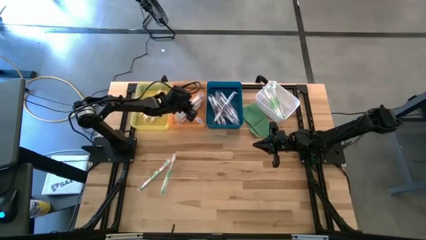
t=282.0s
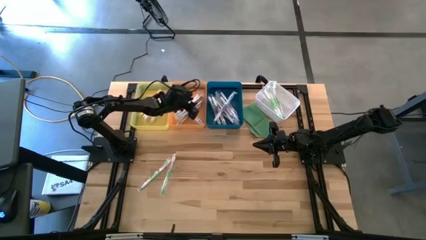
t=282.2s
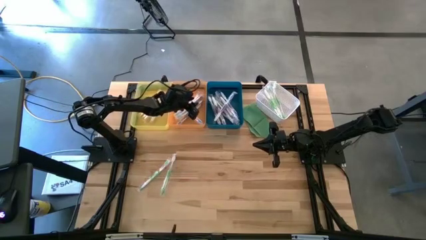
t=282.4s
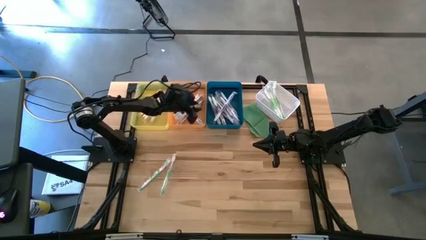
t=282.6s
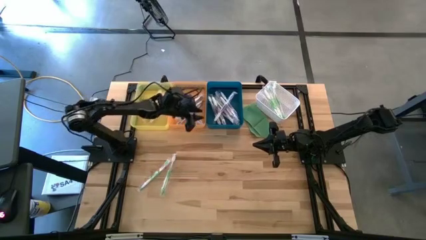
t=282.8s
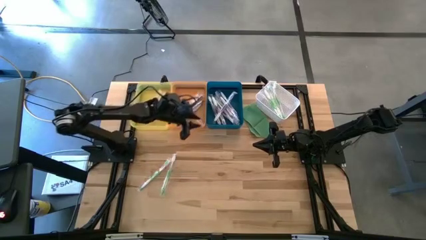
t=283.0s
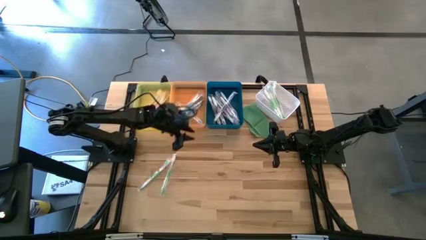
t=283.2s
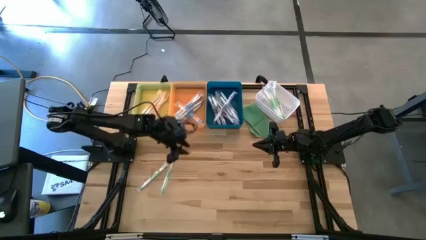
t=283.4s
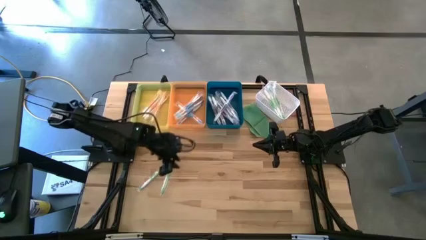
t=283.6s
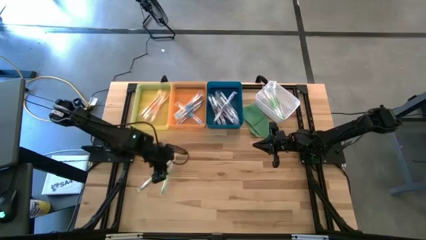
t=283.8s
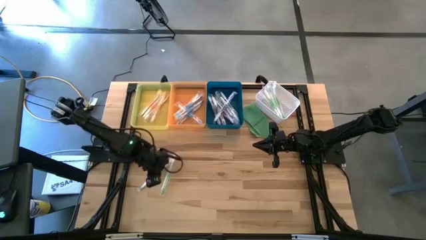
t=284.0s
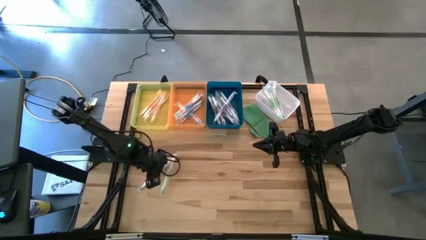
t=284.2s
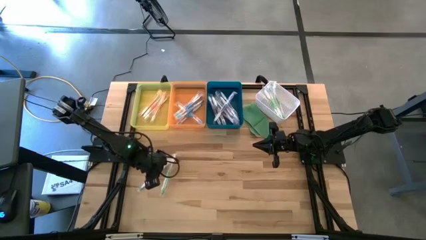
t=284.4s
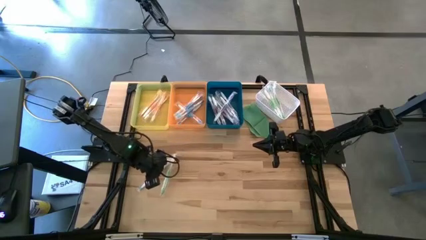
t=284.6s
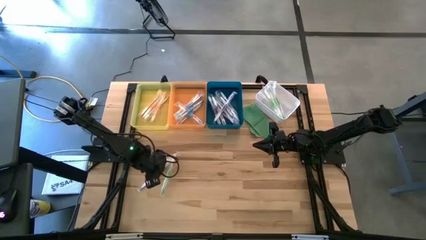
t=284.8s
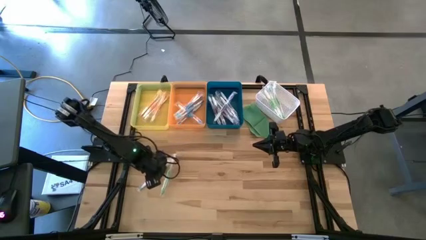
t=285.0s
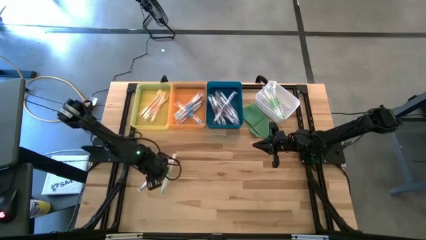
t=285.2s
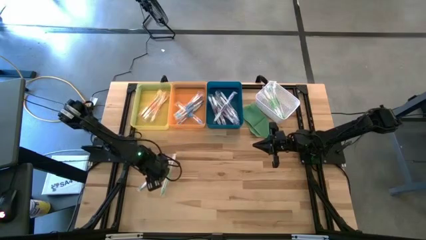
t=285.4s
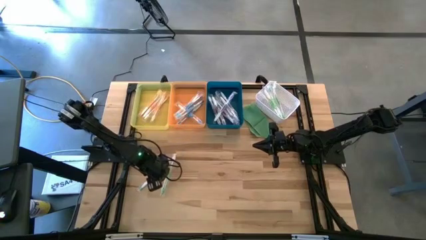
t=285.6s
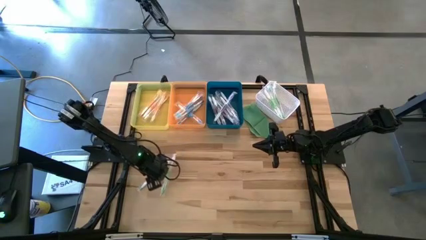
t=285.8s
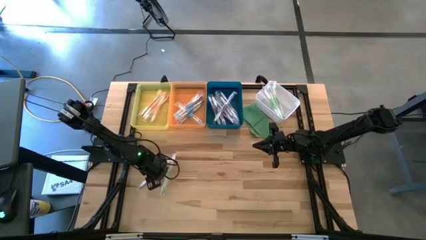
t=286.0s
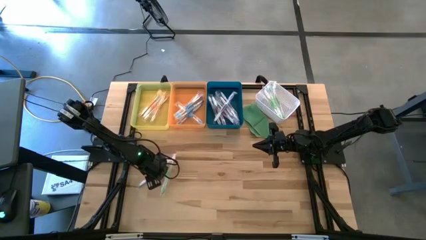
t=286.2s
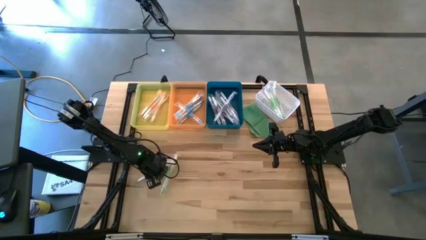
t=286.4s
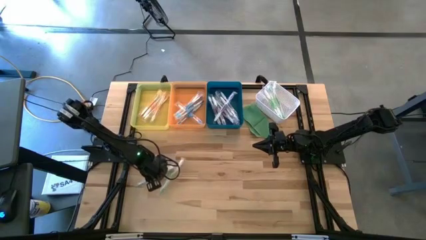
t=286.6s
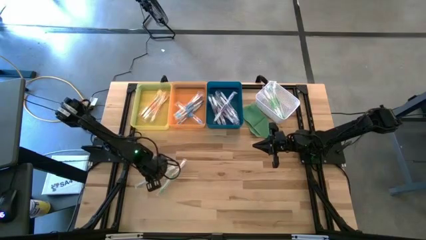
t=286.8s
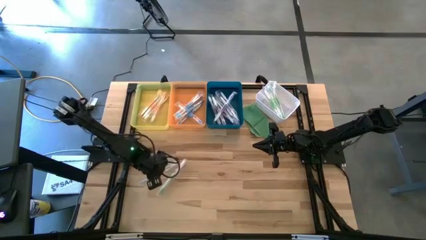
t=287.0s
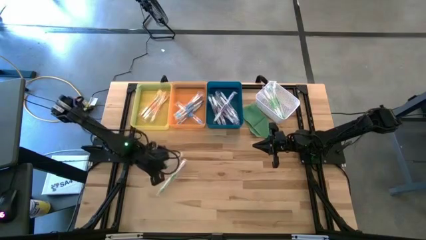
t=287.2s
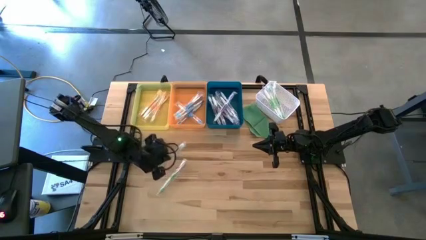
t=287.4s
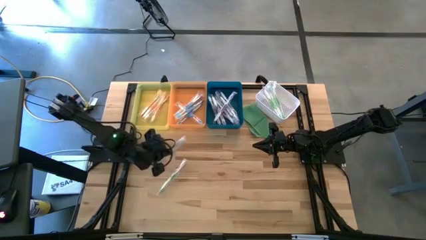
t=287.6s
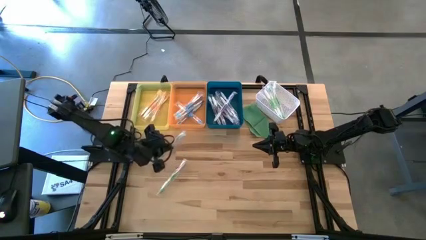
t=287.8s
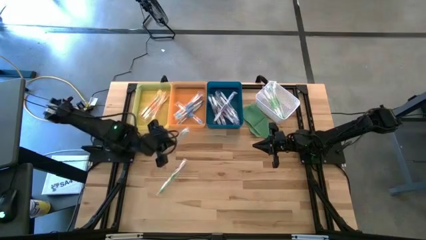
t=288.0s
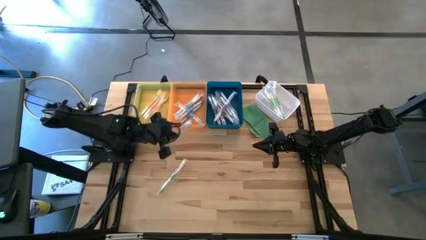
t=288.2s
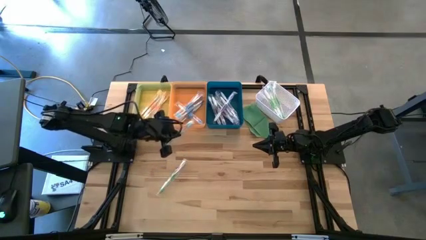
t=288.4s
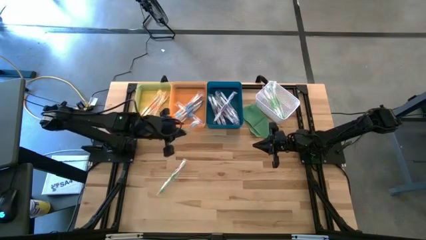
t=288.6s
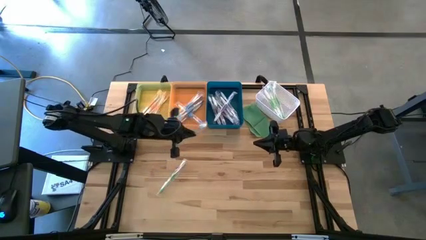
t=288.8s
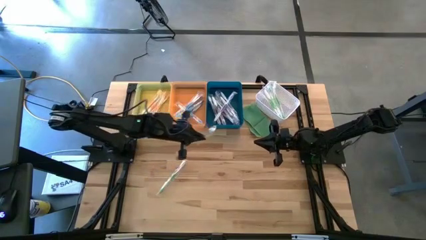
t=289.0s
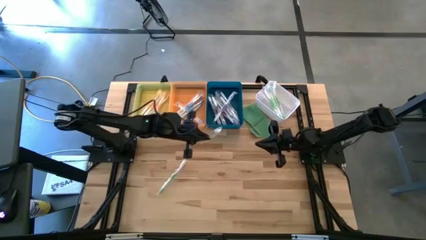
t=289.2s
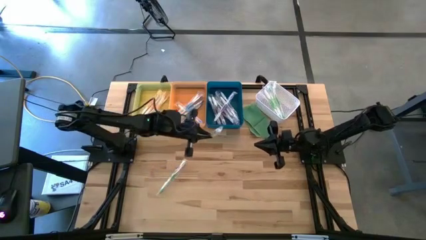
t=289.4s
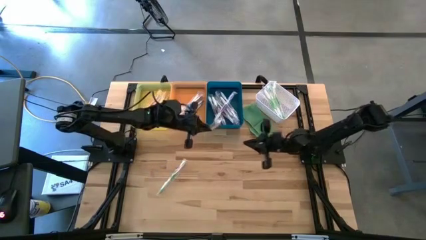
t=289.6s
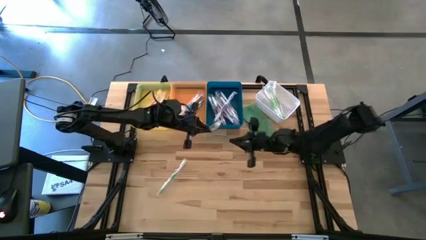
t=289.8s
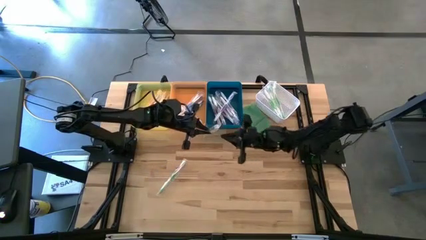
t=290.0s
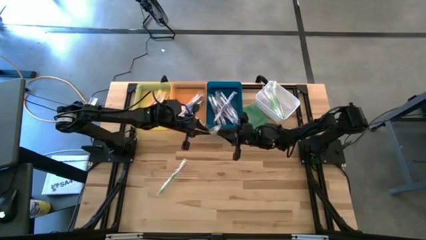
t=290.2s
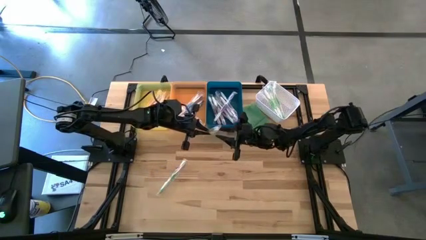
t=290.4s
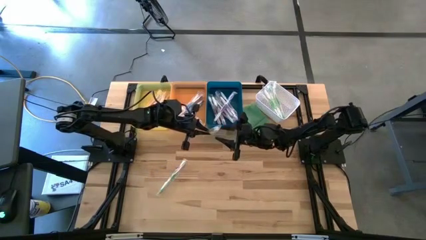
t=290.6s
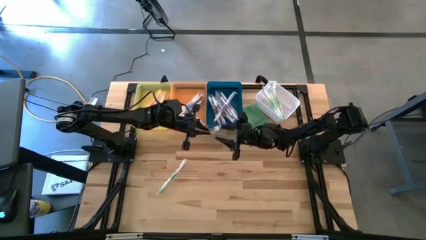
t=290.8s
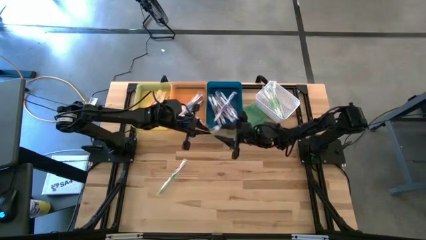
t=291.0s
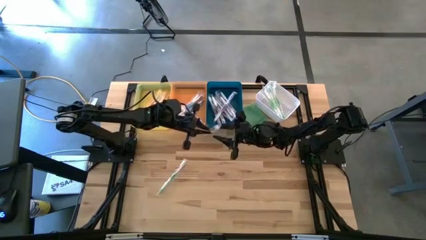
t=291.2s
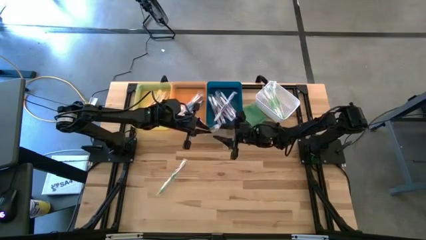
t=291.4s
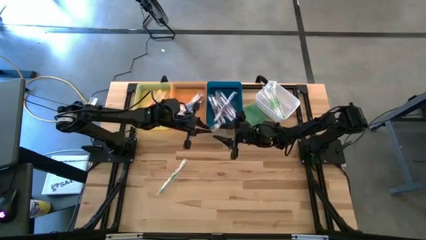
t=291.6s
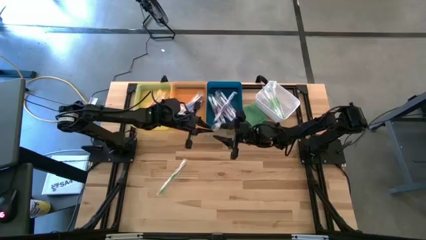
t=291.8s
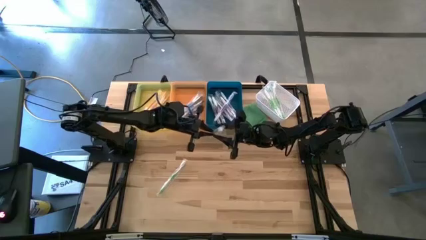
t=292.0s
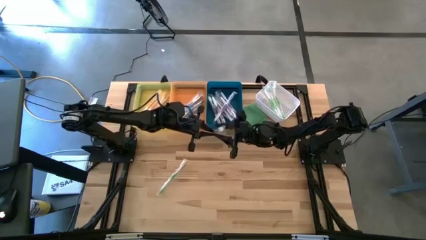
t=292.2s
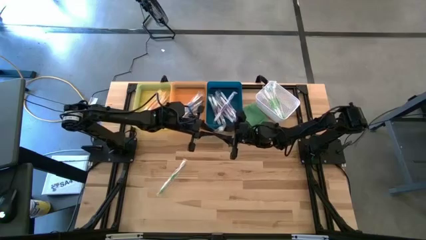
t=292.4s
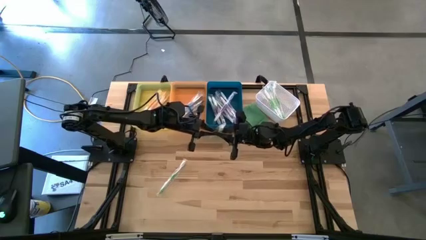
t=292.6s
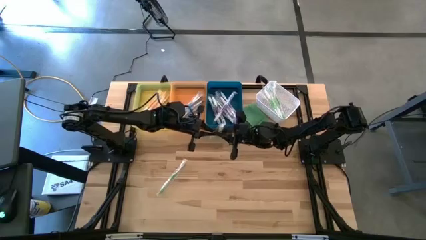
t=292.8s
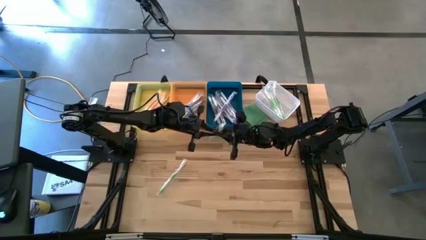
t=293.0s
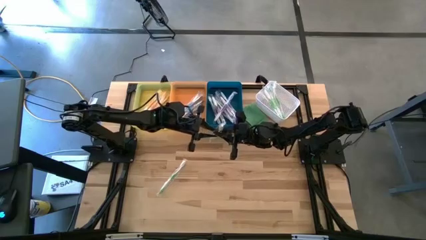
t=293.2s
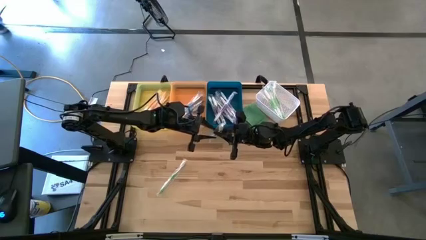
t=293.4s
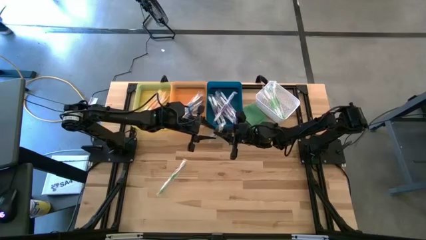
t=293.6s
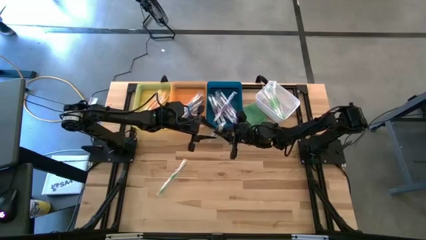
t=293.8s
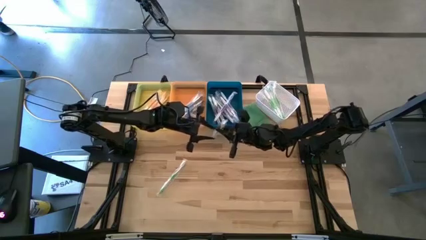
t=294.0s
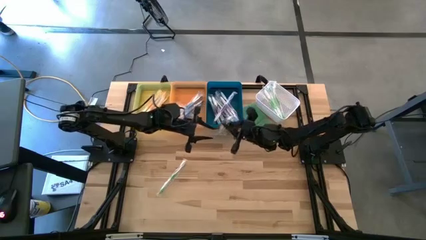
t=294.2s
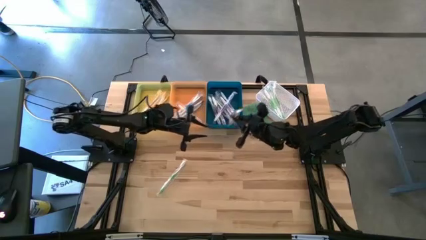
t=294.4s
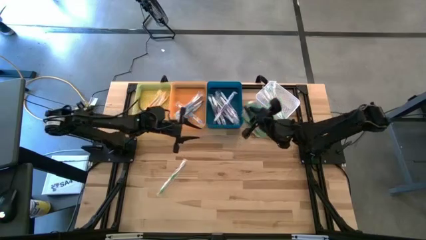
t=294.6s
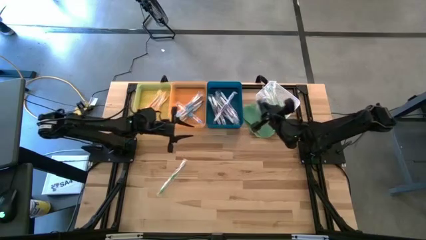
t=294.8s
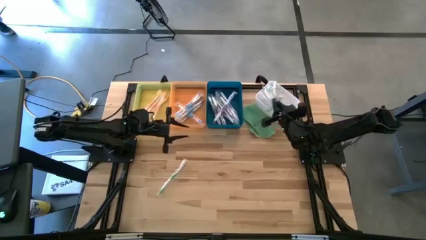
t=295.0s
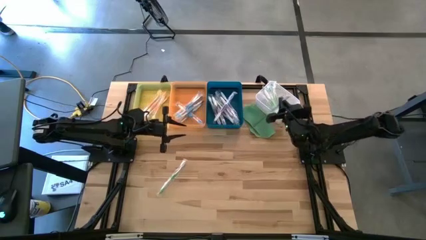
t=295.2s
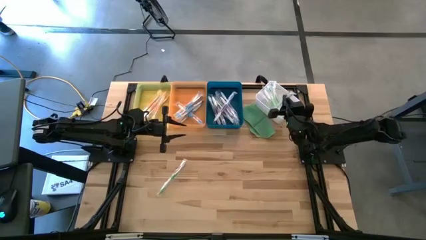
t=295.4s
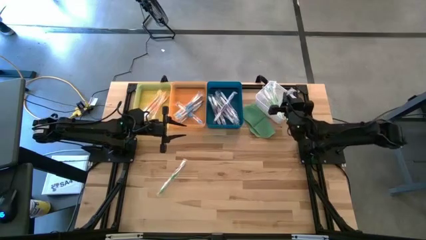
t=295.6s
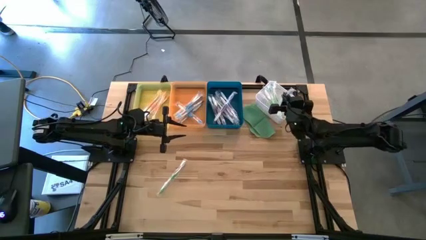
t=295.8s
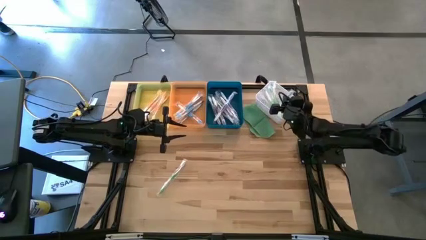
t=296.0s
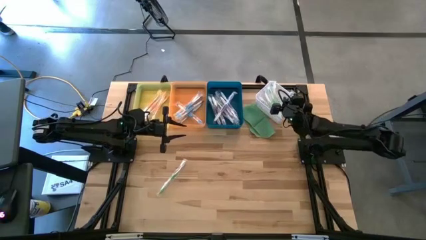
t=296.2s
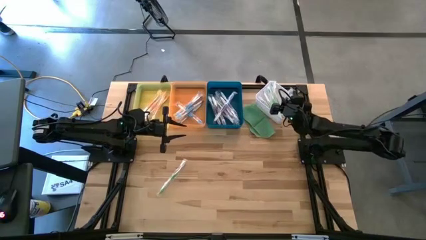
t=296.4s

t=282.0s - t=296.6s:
Task: Pick & Place Toothbrushes
Put the green toothbrush into the white bin
